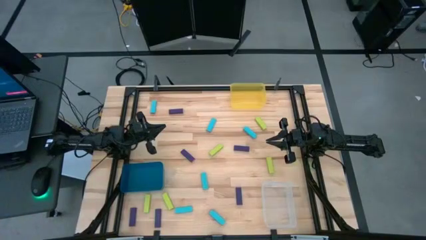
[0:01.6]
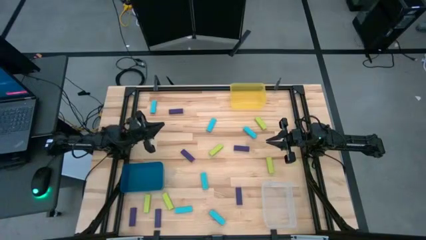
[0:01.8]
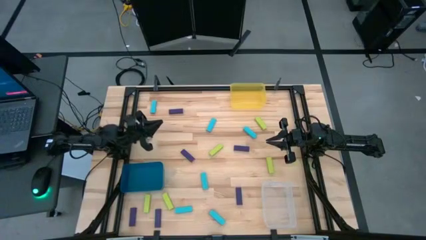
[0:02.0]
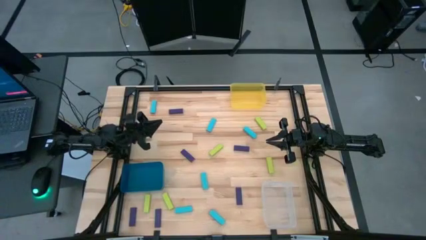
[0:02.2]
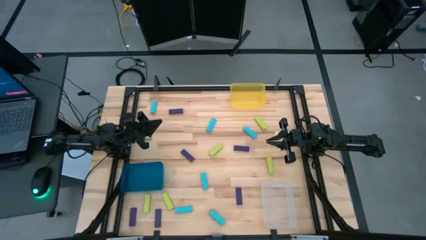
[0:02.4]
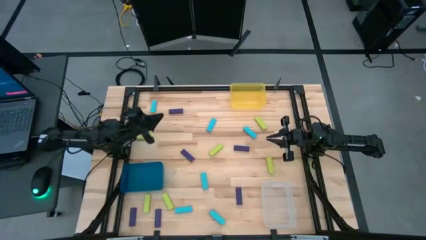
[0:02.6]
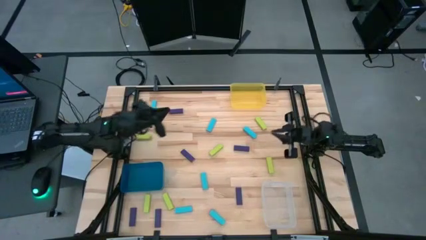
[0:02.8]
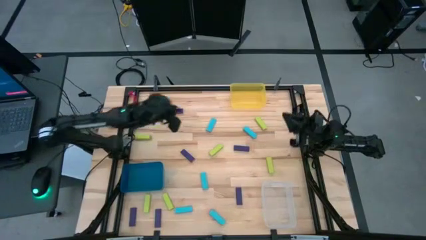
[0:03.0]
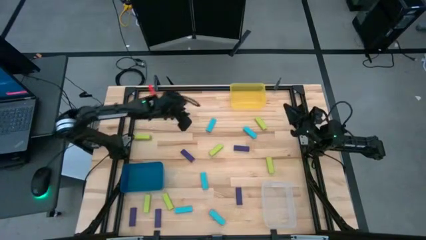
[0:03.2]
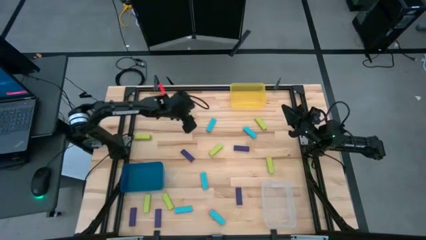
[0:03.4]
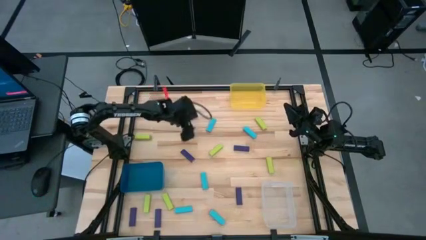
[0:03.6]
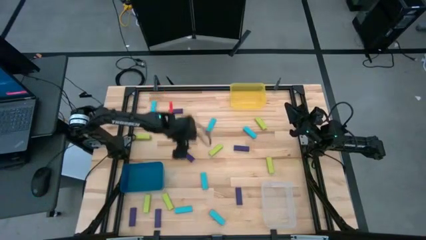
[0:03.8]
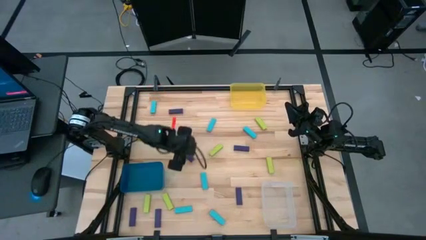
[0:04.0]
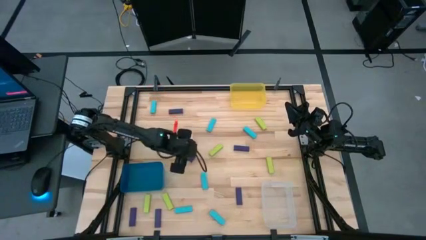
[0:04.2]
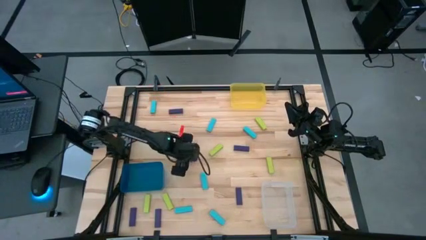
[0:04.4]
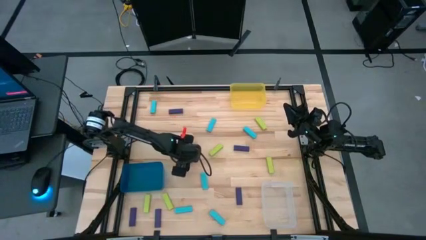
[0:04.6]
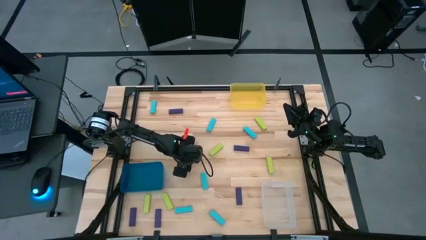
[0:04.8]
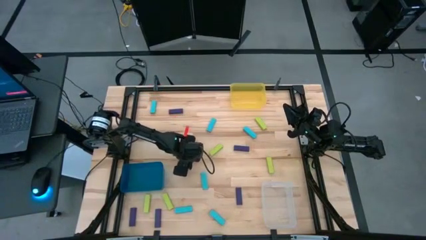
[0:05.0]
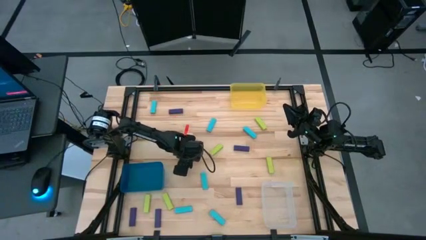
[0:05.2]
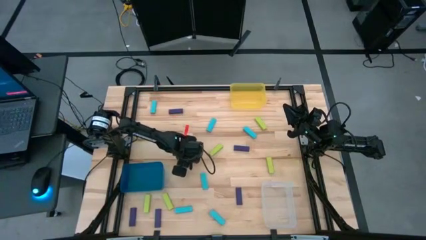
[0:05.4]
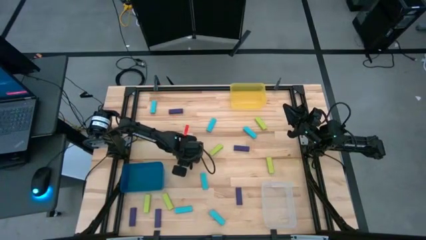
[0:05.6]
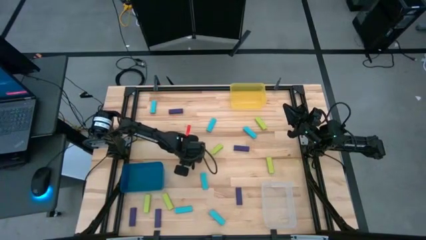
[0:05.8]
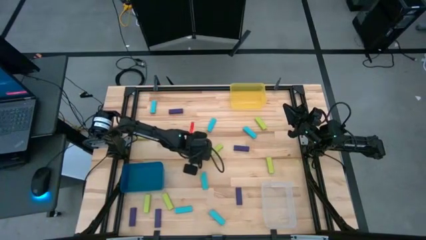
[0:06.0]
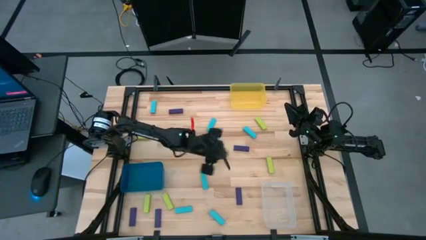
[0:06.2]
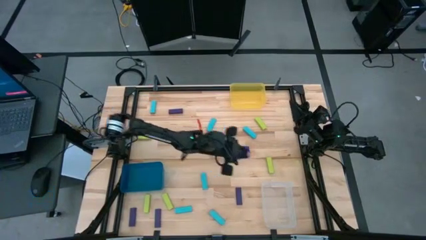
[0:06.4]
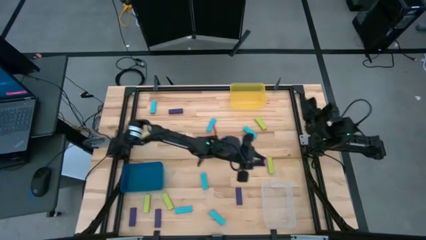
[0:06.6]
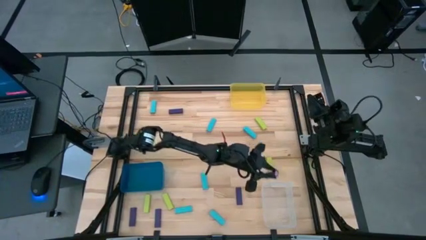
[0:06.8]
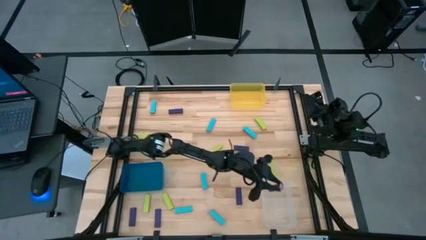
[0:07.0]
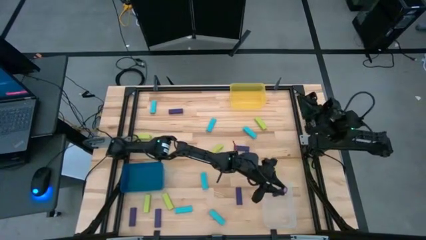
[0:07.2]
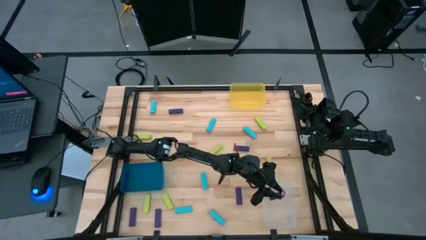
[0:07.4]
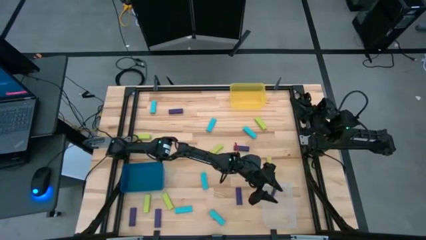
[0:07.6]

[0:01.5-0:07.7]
Task: Sort blocks
Put the purple block into the transparent bin

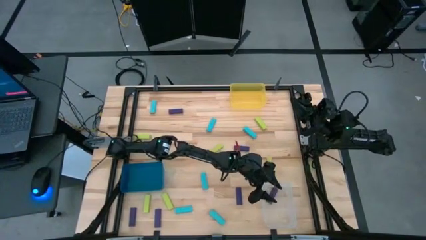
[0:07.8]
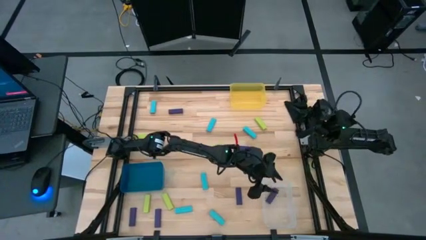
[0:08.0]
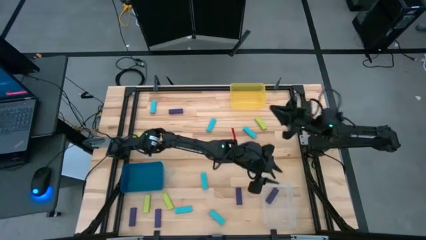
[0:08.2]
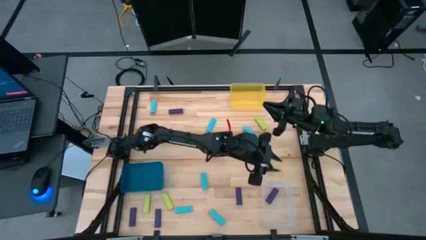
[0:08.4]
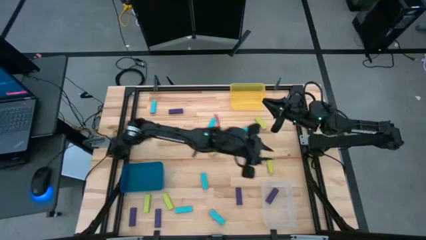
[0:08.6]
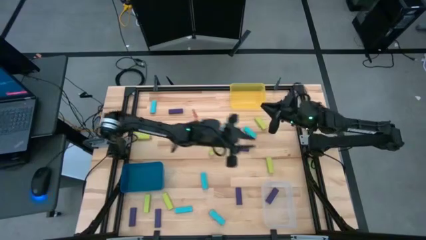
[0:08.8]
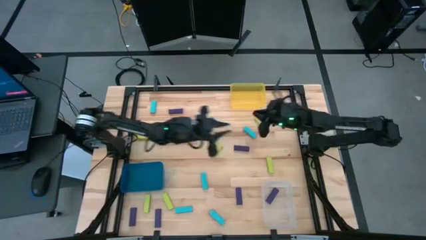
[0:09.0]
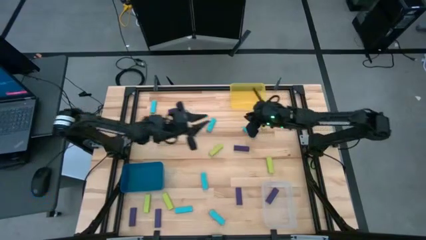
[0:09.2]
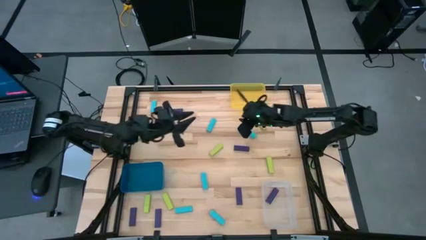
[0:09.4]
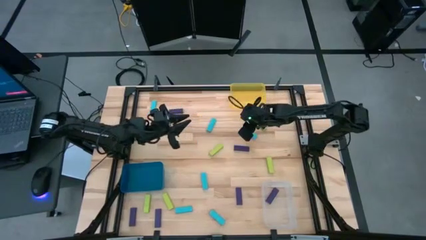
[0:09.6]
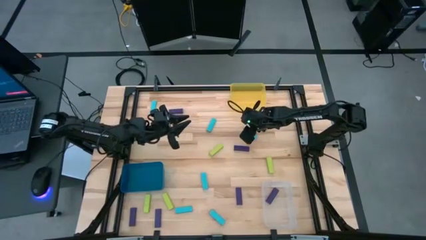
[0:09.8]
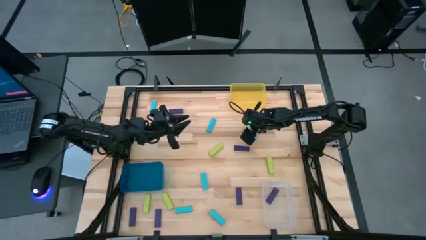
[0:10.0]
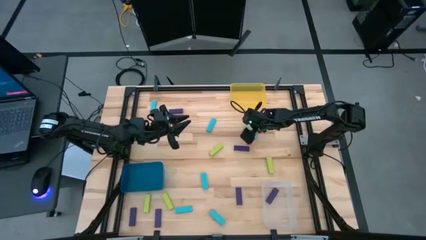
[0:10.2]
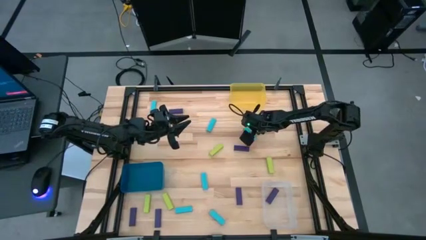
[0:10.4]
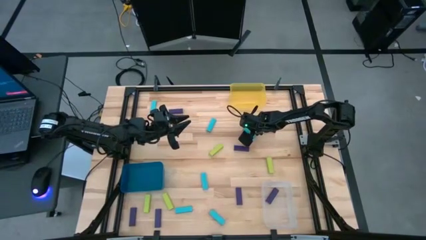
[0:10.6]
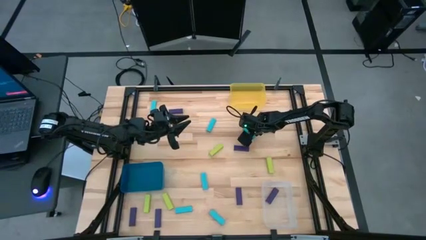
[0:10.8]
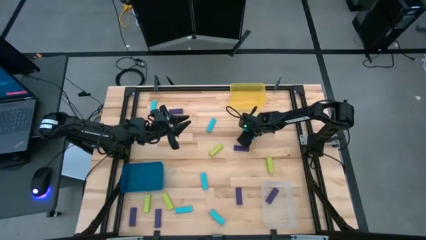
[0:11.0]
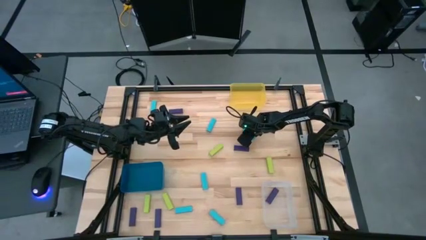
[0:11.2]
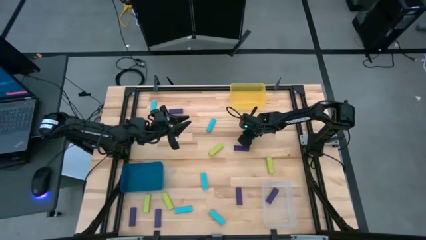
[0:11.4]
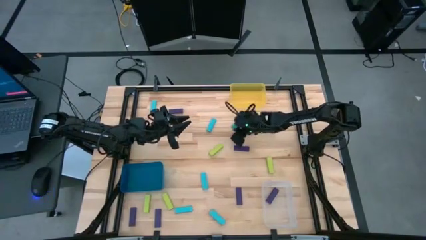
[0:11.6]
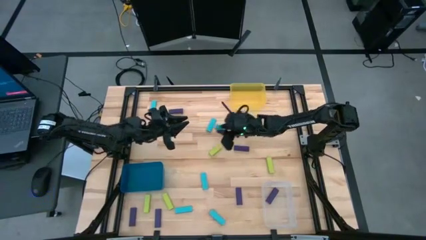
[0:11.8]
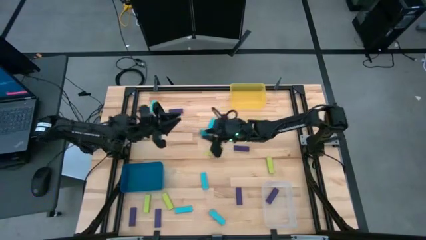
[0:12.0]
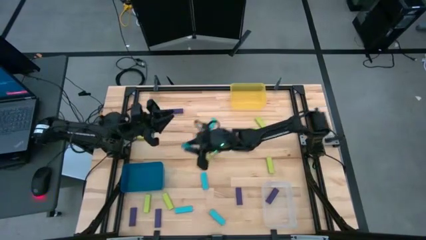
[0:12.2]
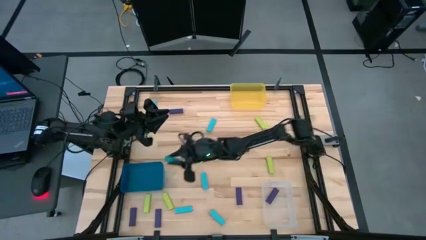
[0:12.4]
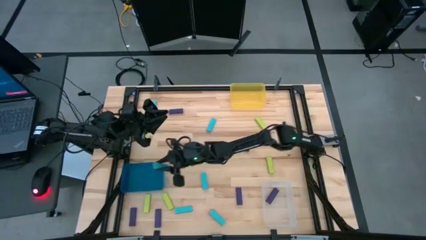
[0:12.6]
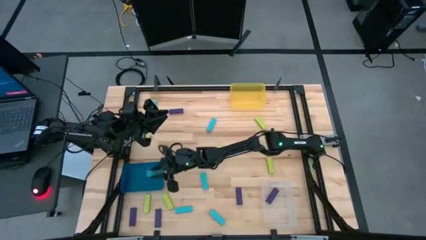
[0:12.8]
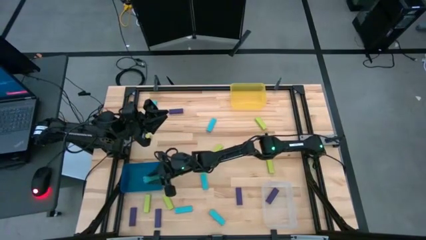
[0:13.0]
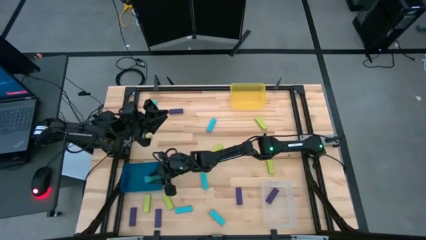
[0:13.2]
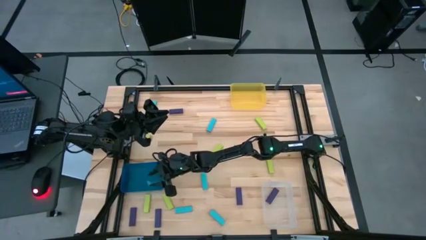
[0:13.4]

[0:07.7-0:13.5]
Put the blue block into the dark blue bin

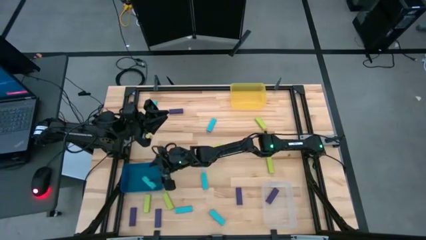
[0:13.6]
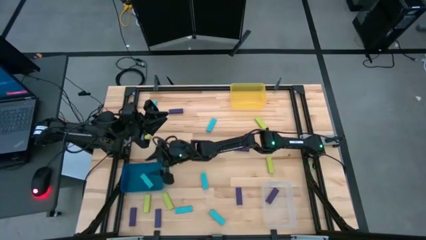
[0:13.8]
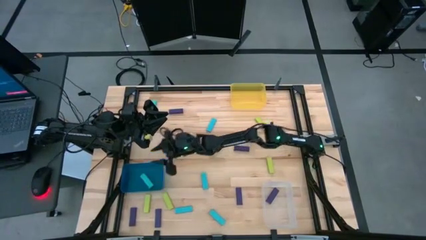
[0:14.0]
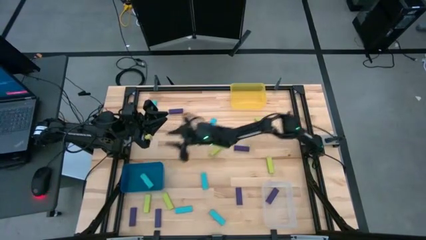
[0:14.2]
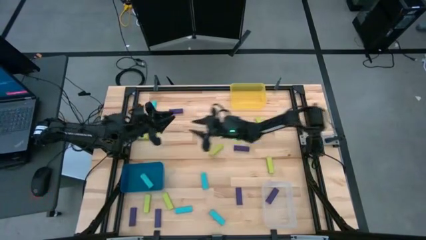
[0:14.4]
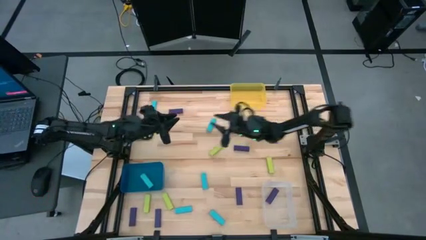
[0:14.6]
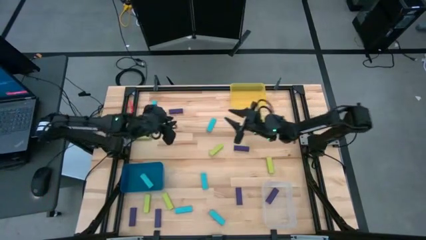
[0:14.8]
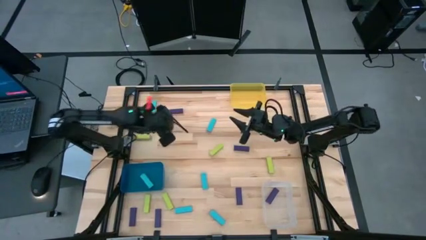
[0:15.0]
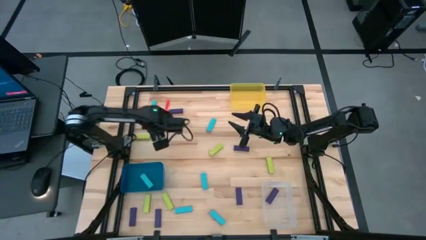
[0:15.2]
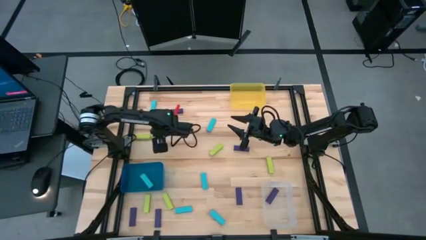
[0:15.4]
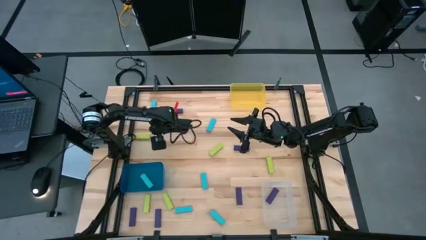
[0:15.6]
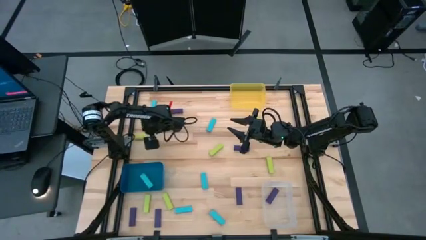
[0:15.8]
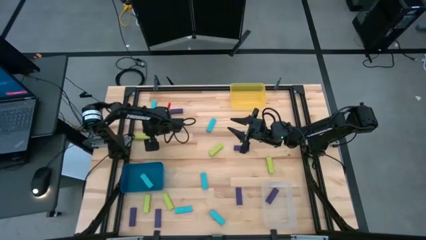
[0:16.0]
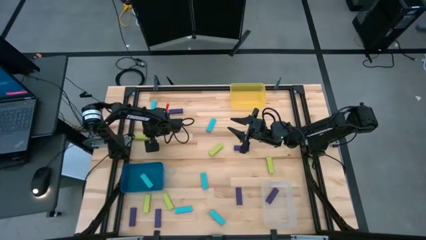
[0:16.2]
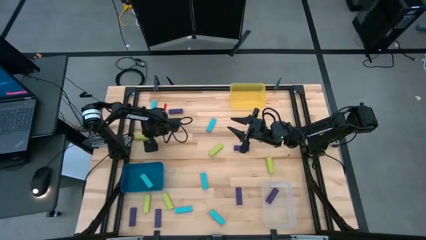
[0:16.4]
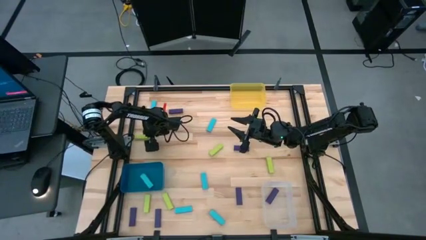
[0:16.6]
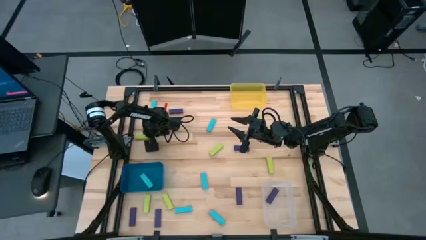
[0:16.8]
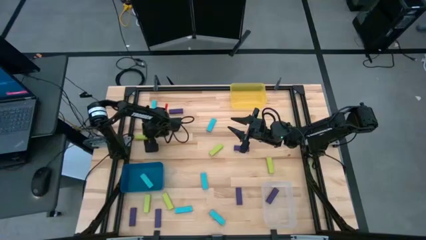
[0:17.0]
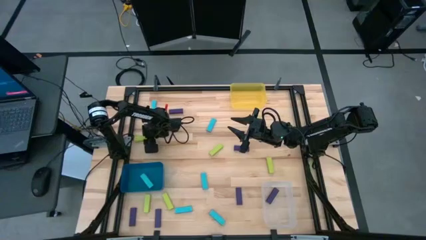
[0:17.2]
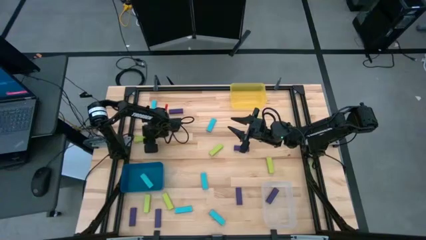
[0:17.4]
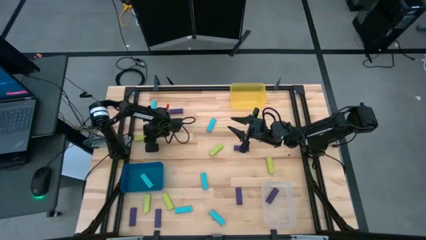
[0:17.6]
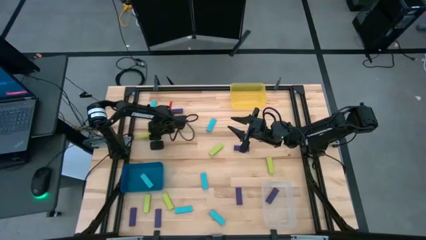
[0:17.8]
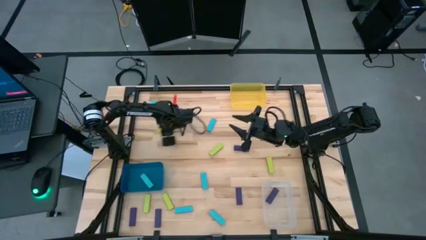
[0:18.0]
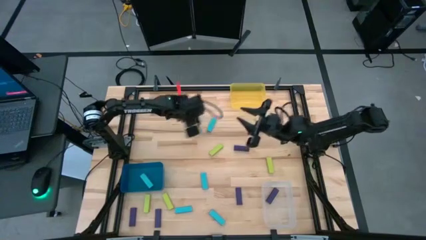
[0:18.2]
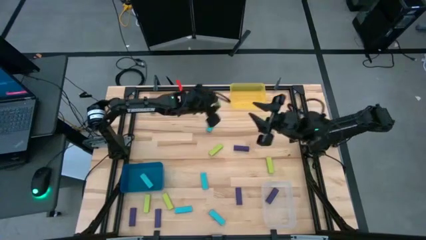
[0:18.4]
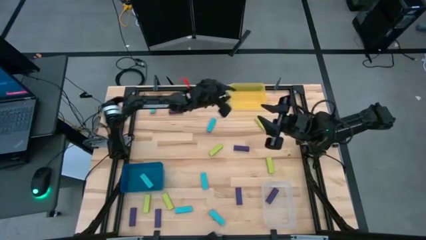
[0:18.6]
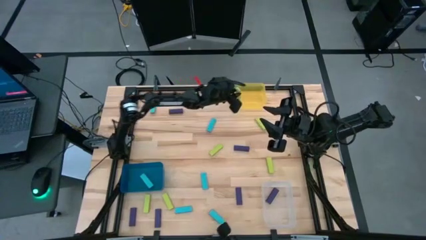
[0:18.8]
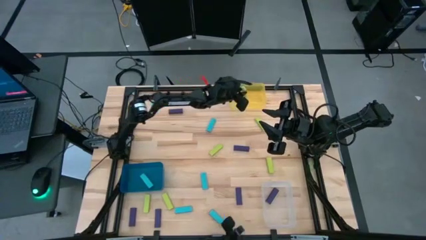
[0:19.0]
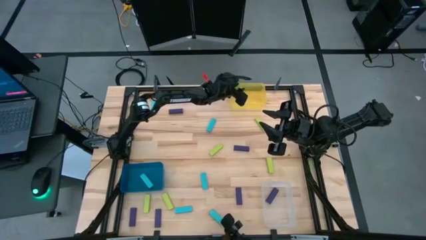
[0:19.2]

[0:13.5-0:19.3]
Put the green block into the yellow bin
